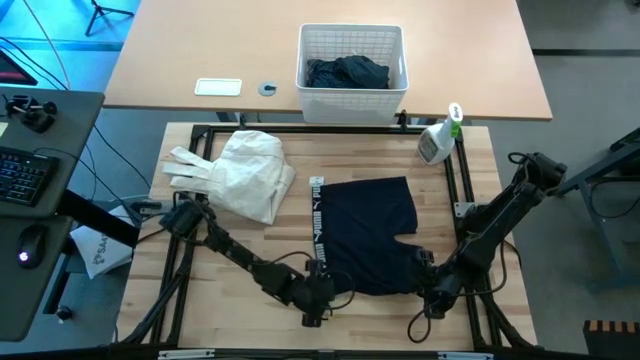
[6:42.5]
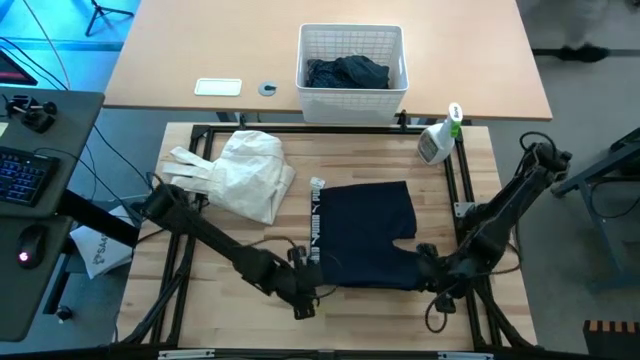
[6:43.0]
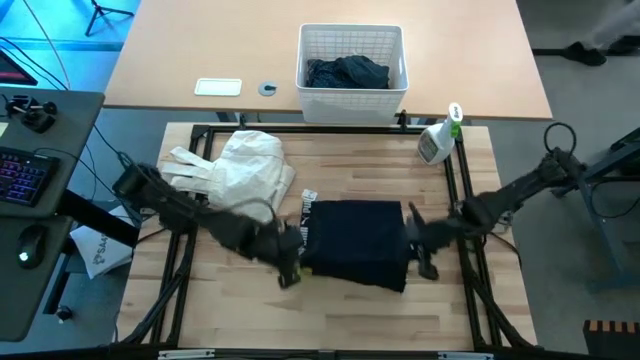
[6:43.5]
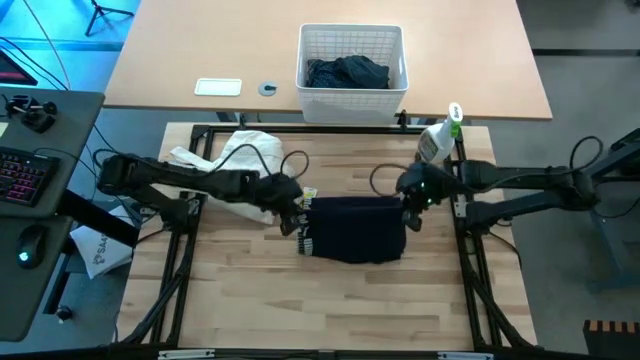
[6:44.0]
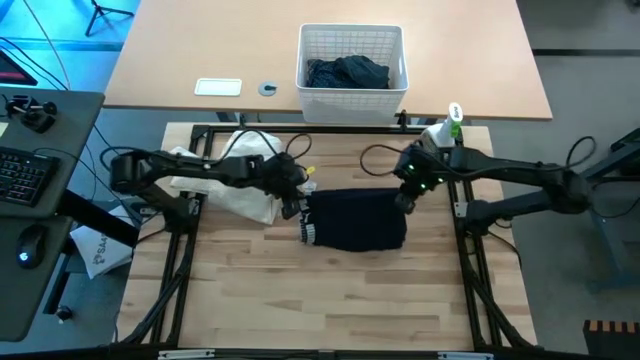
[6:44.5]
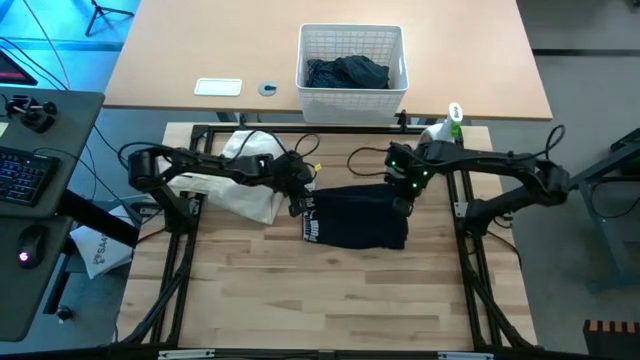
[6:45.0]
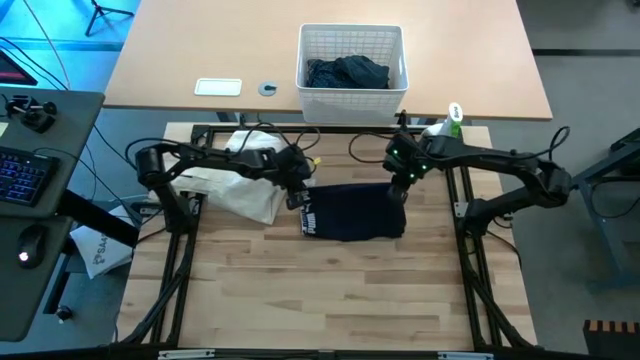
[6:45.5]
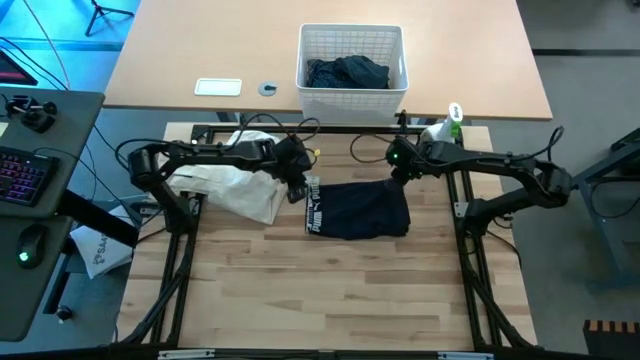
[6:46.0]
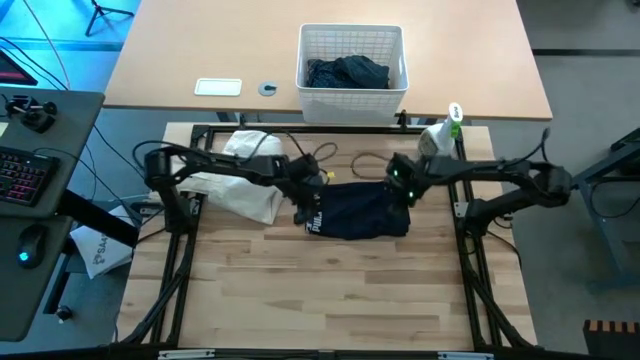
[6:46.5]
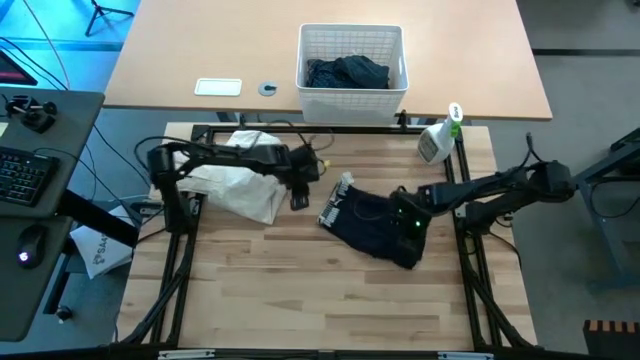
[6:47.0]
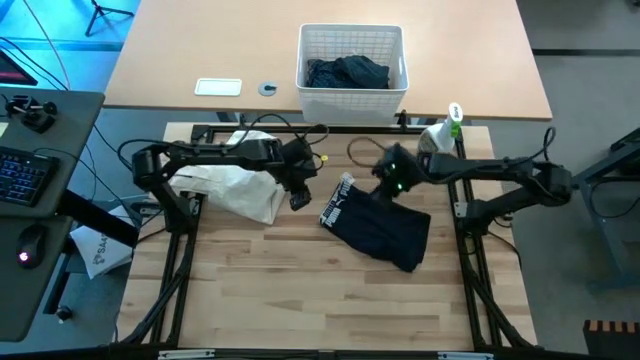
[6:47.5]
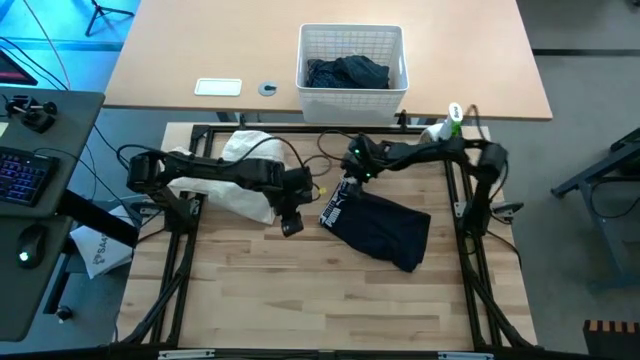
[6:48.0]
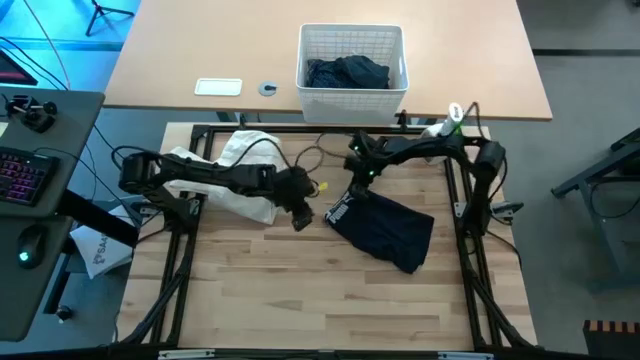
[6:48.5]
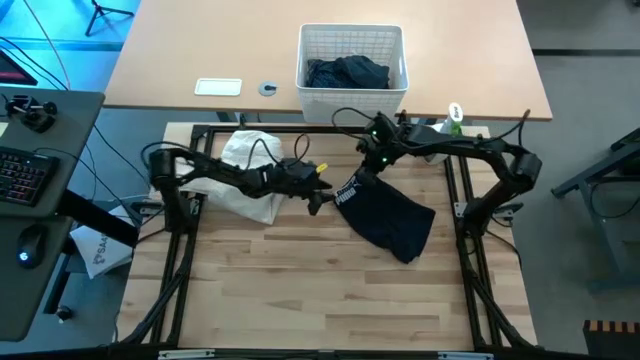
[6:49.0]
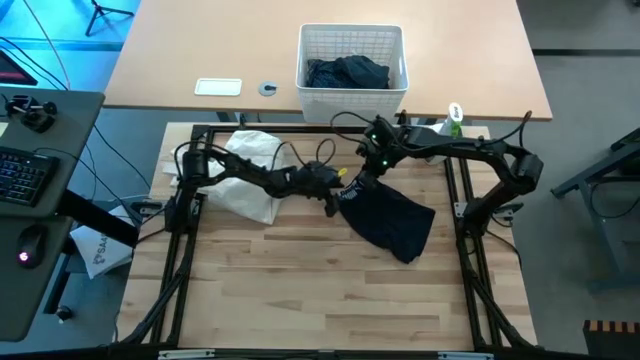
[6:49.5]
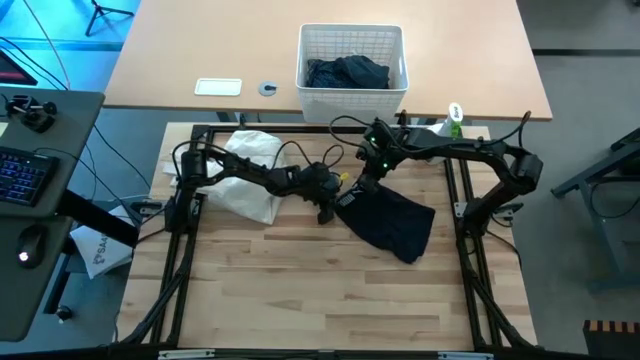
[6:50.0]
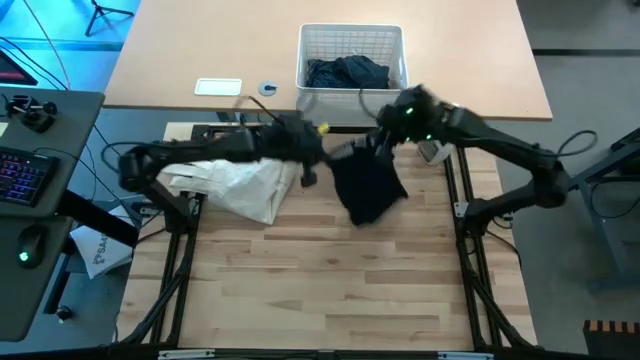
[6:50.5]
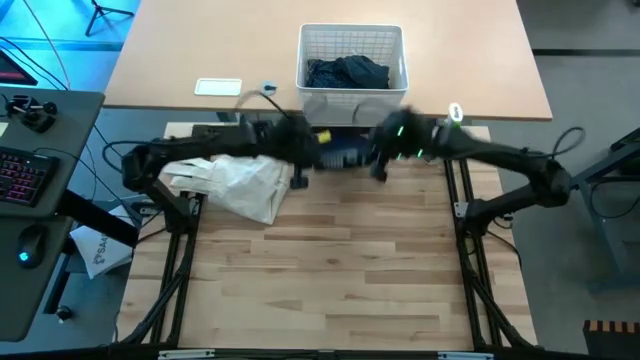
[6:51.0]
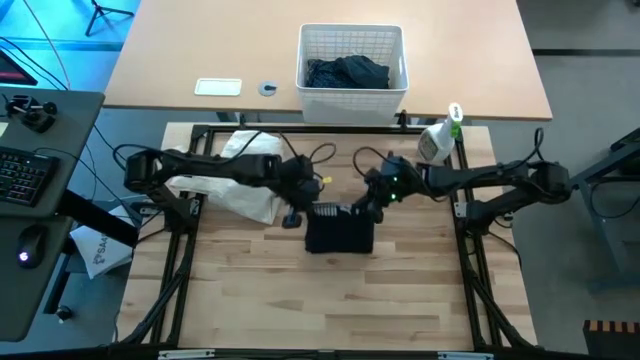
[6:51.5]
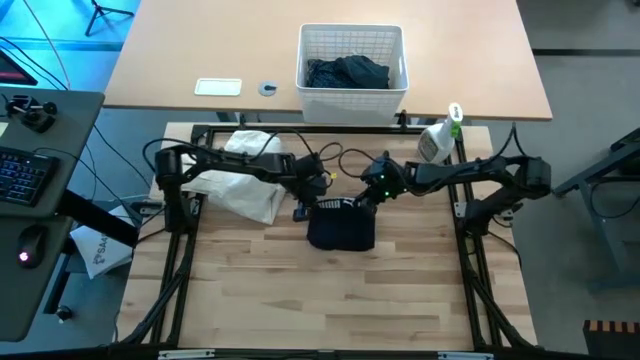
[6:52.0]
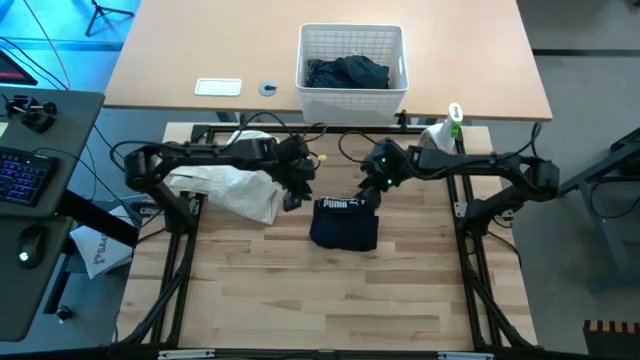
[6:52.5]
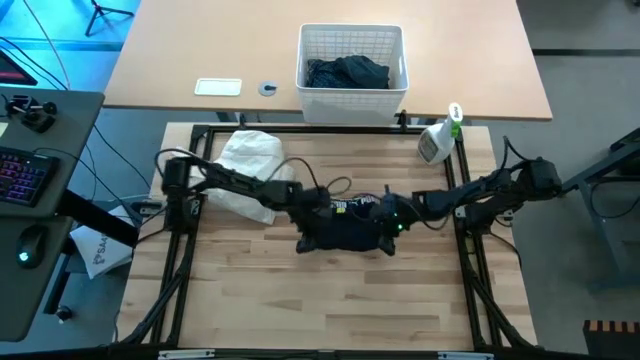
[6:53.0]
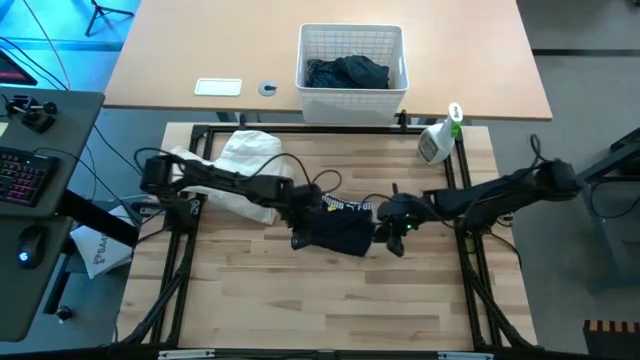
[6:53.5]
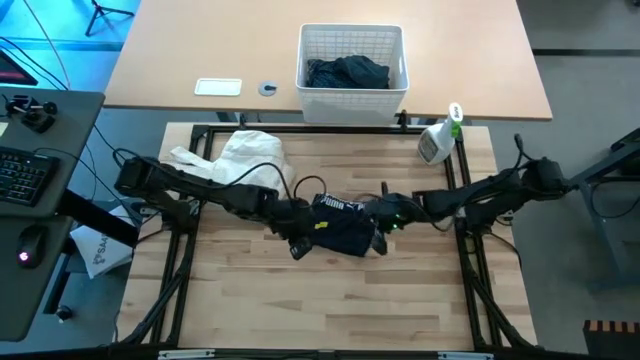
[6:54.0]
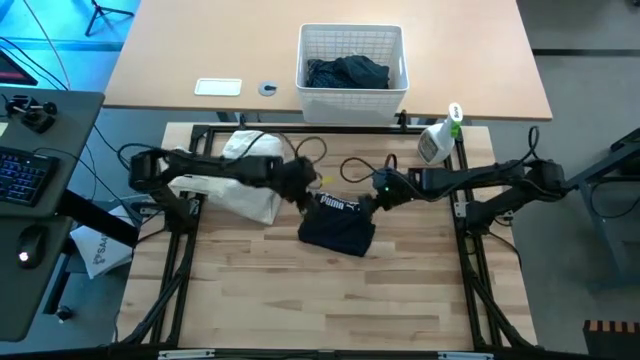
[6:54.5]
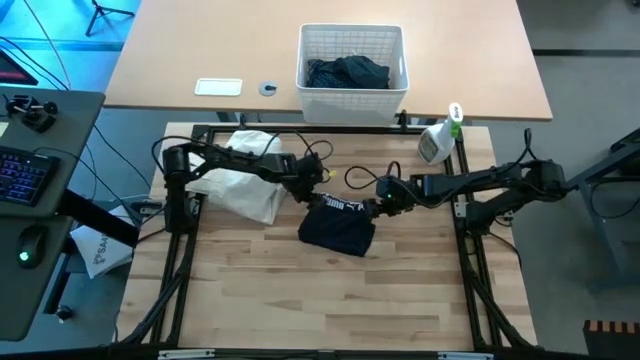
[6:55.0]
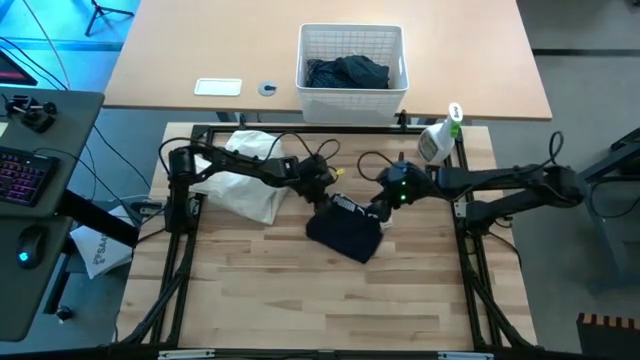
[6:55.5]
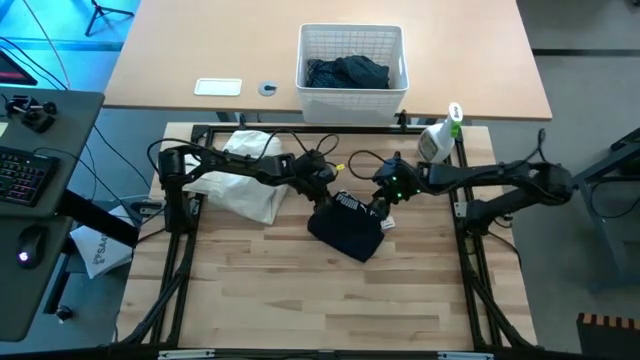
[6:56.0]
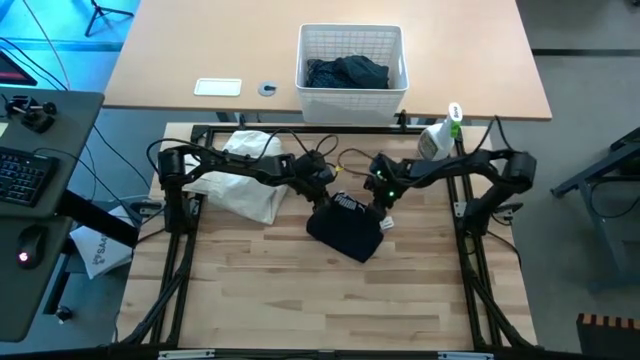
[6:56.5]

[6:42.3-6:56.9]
Task: Fold laundry
Fold the blue underwear

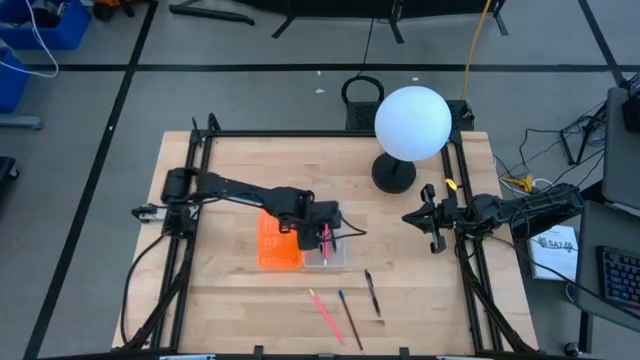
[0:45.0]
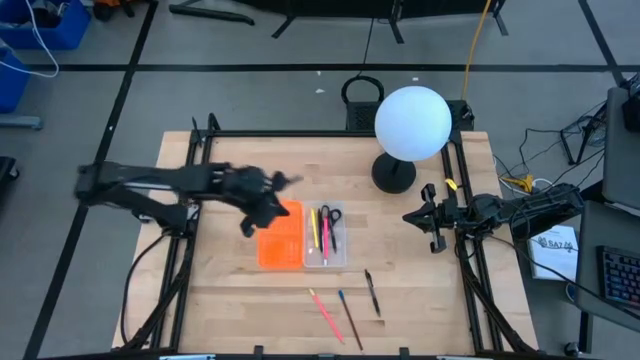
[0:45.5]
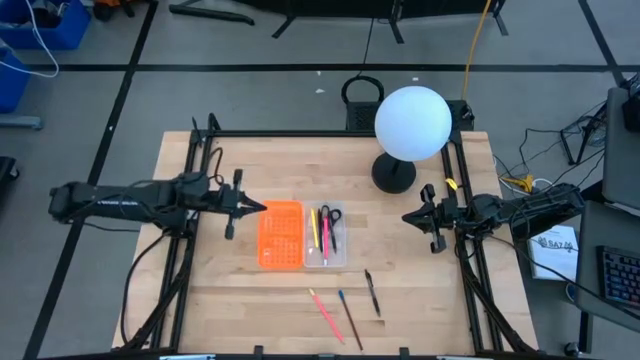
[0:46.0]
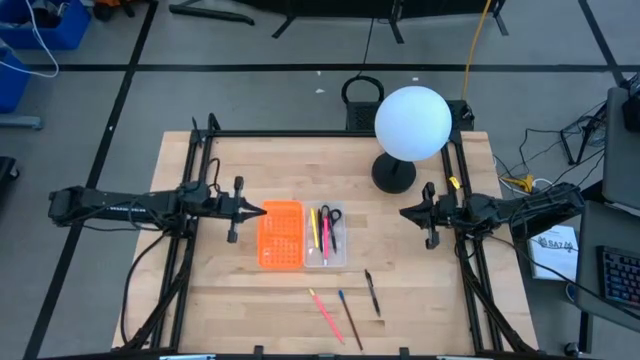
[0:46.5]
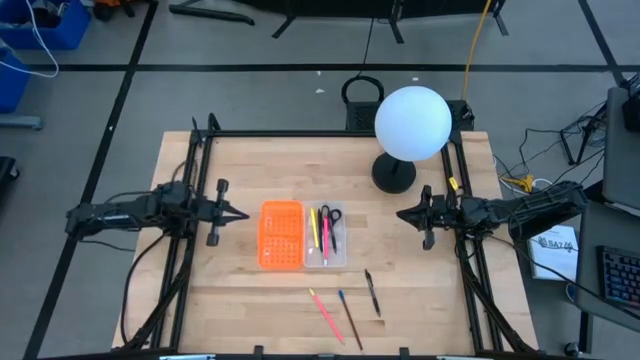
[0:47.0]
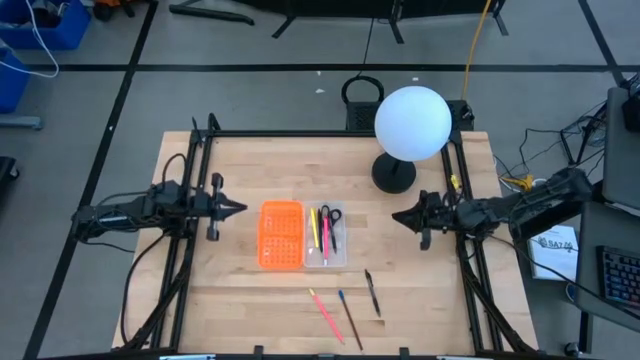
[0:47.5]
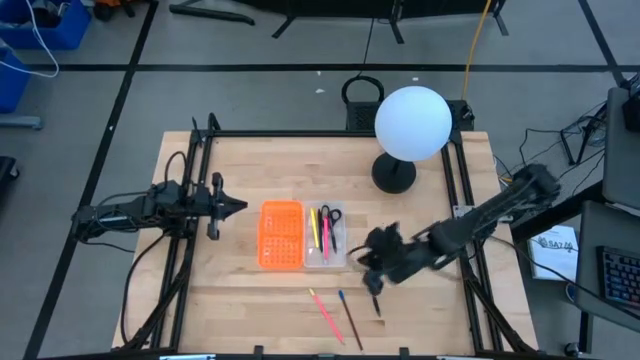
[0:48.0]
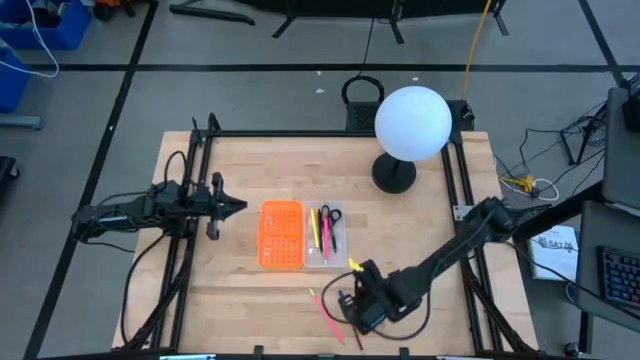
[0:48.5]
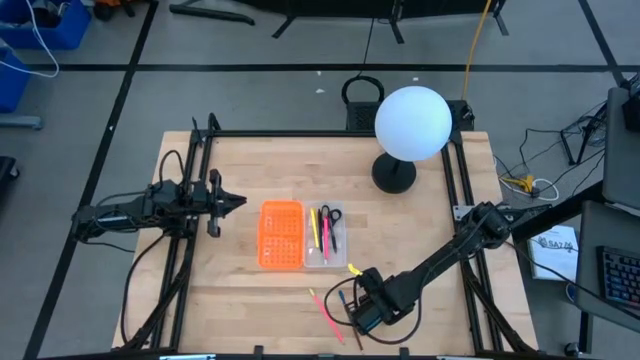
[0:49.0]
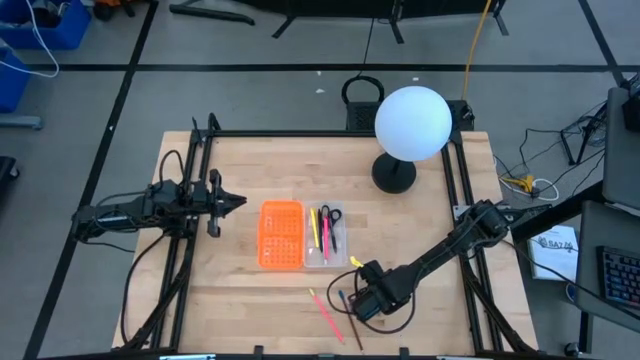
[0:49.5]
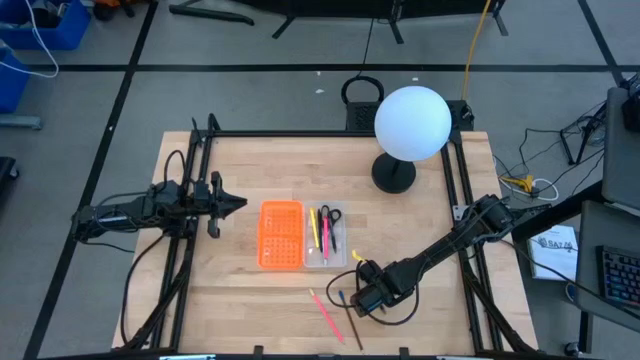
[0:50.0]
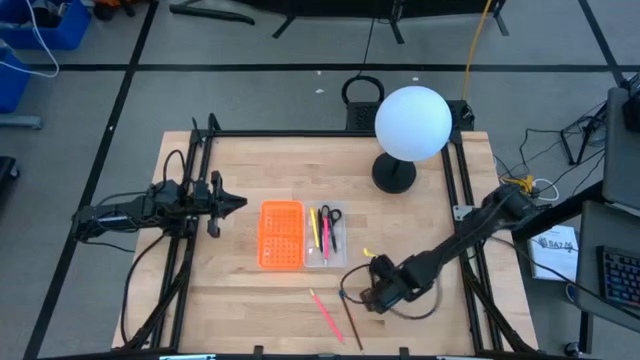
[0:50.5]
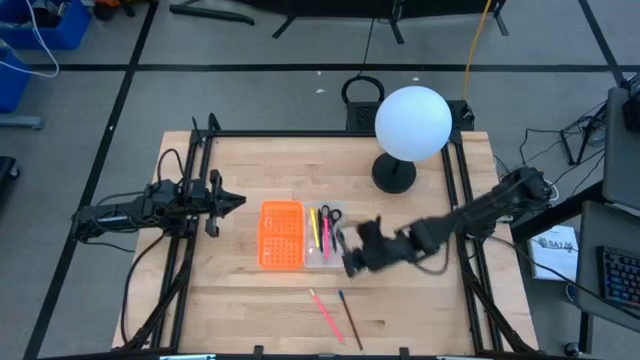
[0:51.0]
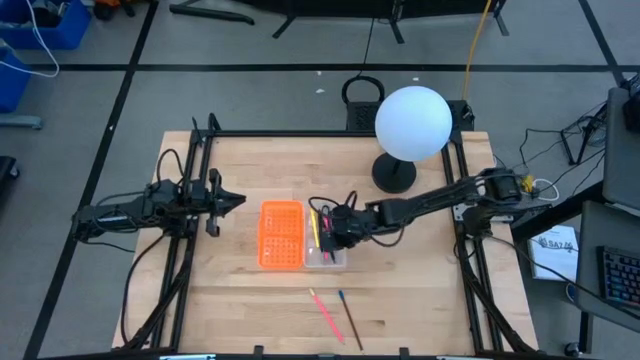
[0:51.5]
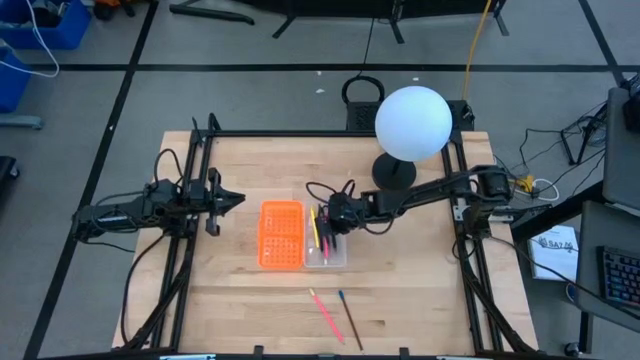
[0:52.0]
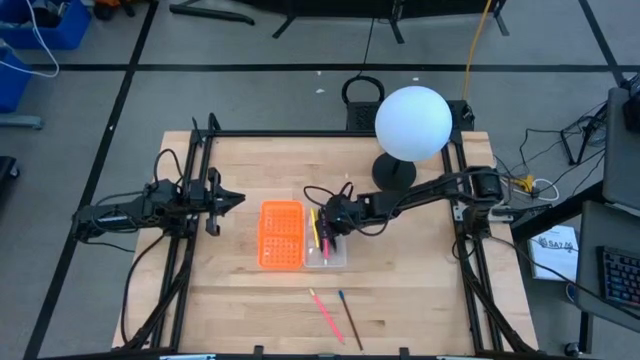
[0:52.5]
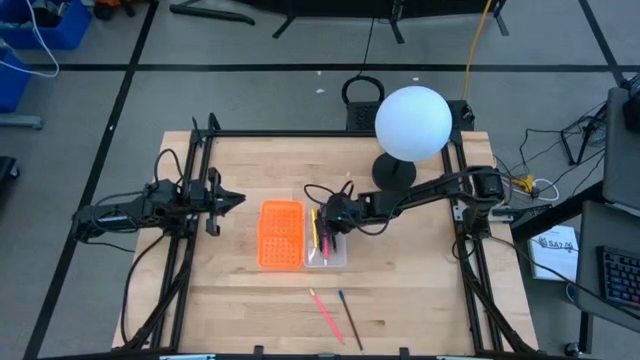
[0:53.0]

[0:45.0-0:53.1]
Task: Pick & place school supplies into a supply box
Put the transparent pen into the orange supply box
